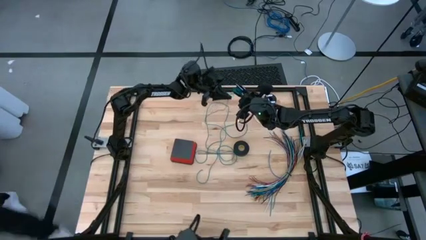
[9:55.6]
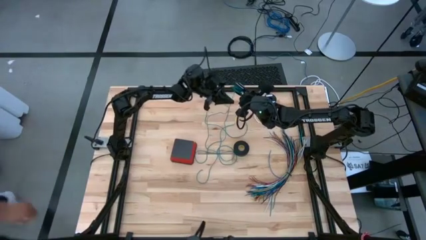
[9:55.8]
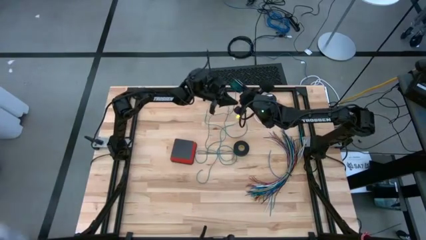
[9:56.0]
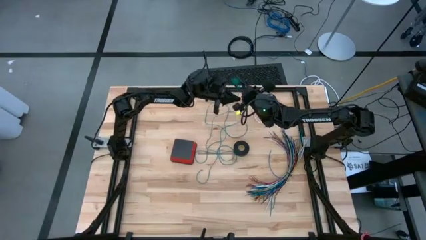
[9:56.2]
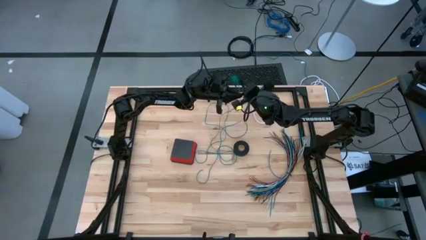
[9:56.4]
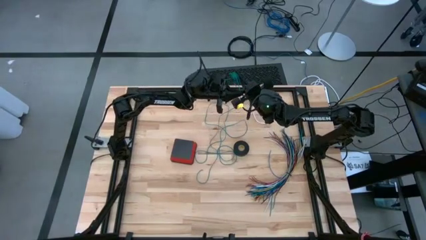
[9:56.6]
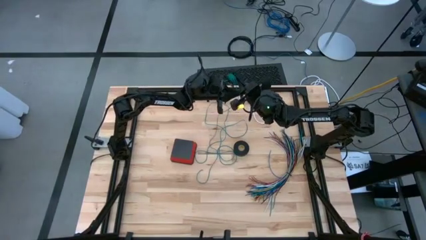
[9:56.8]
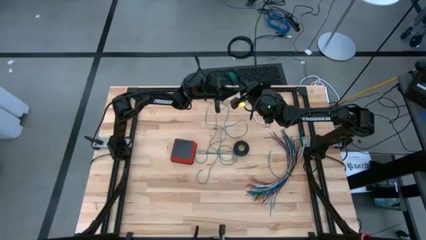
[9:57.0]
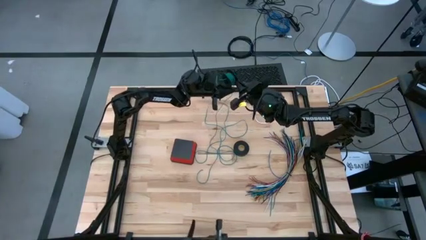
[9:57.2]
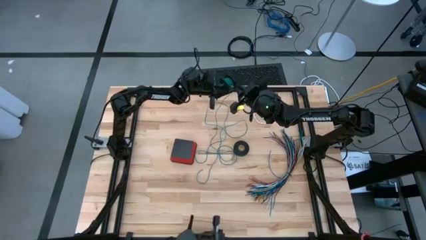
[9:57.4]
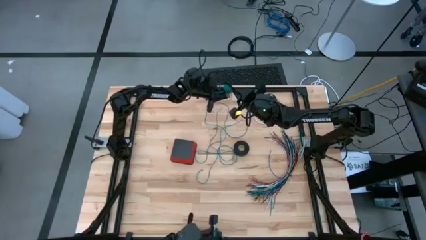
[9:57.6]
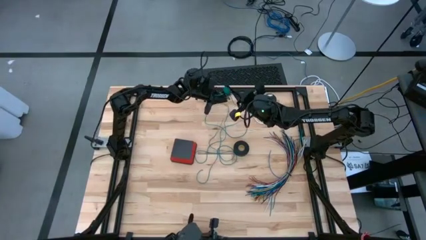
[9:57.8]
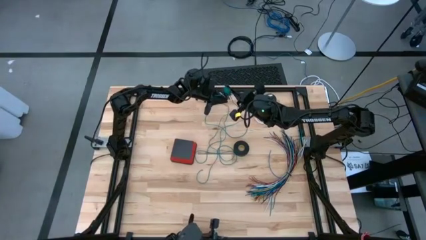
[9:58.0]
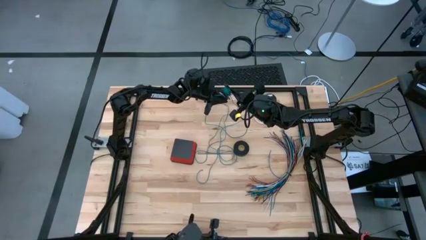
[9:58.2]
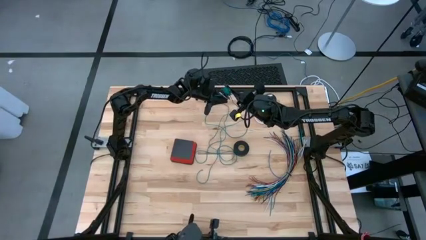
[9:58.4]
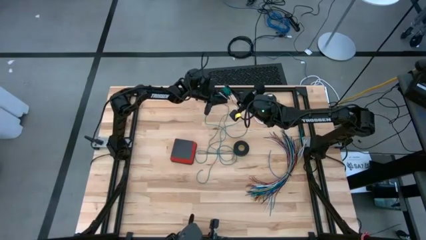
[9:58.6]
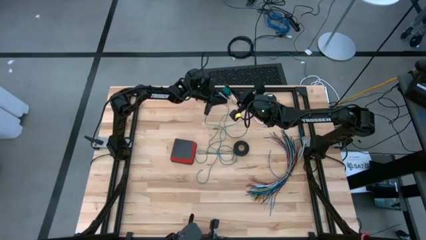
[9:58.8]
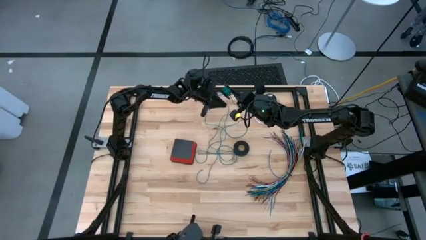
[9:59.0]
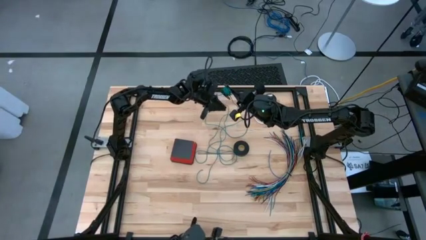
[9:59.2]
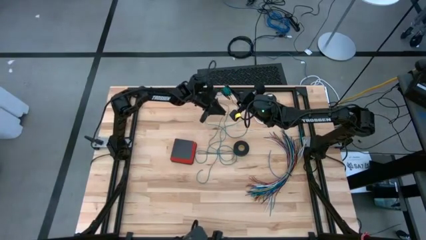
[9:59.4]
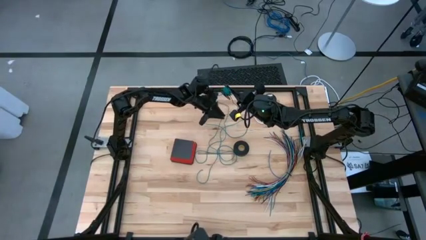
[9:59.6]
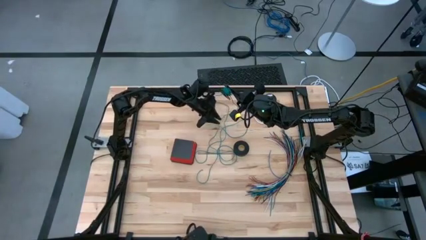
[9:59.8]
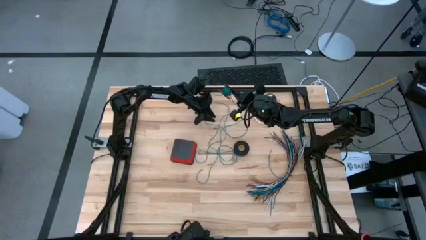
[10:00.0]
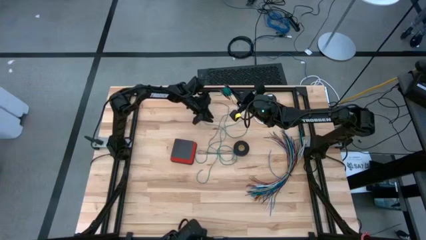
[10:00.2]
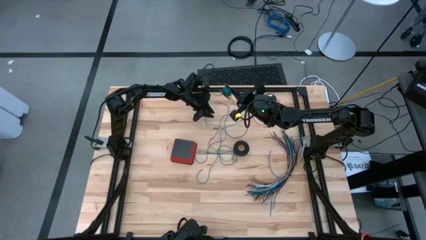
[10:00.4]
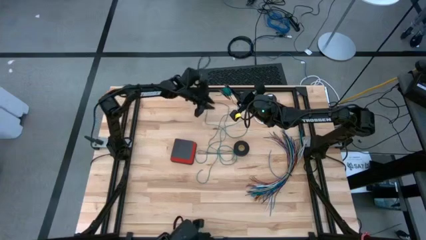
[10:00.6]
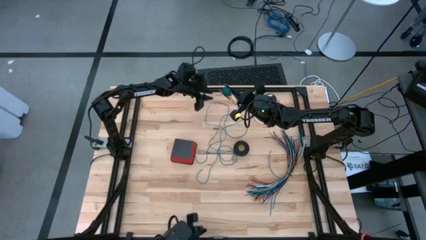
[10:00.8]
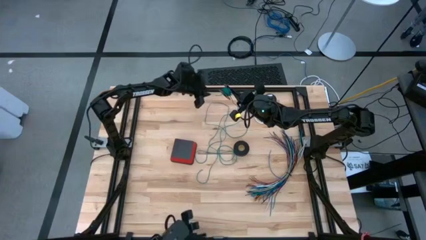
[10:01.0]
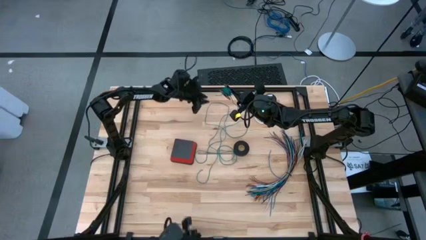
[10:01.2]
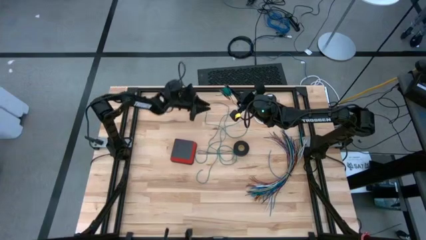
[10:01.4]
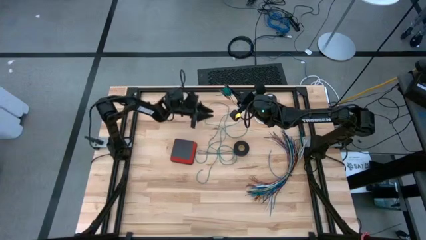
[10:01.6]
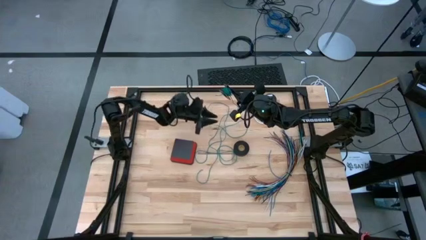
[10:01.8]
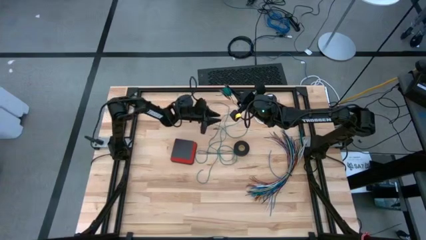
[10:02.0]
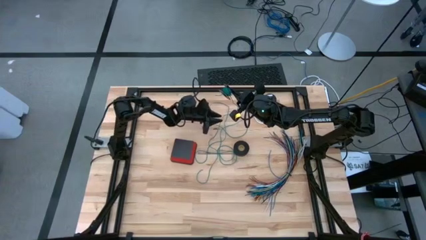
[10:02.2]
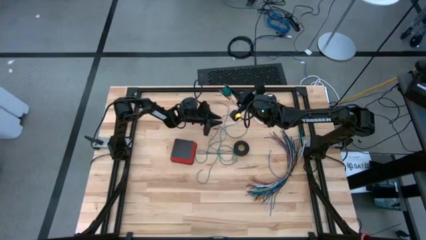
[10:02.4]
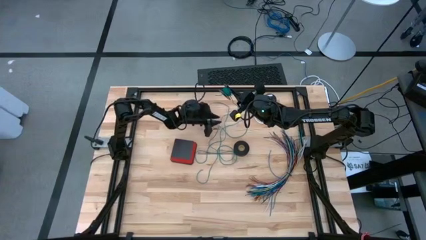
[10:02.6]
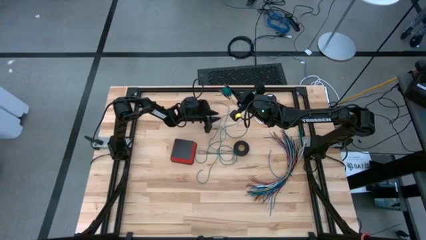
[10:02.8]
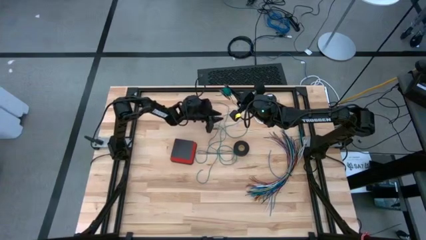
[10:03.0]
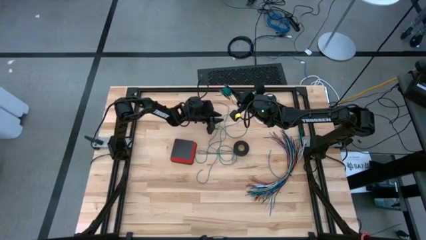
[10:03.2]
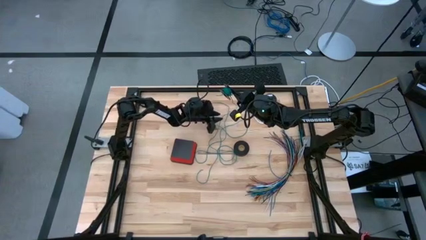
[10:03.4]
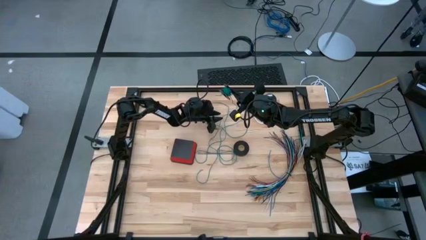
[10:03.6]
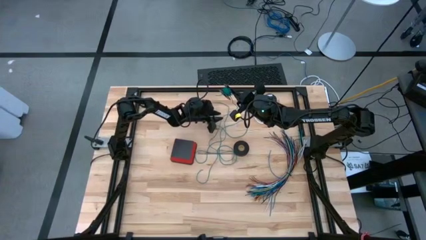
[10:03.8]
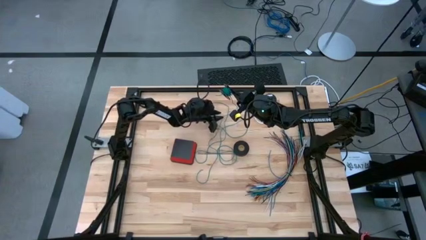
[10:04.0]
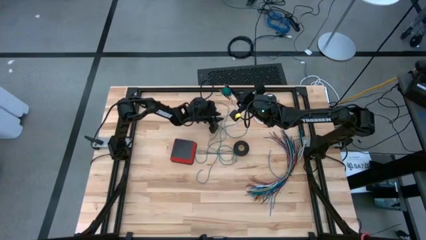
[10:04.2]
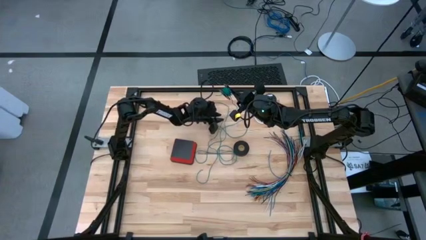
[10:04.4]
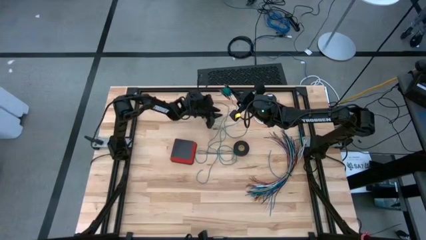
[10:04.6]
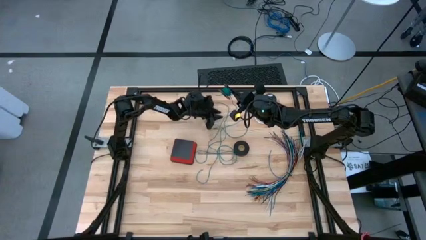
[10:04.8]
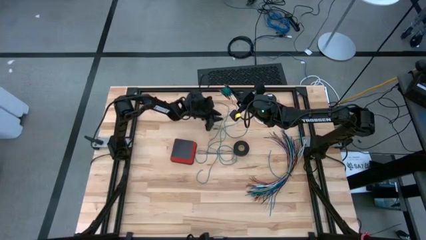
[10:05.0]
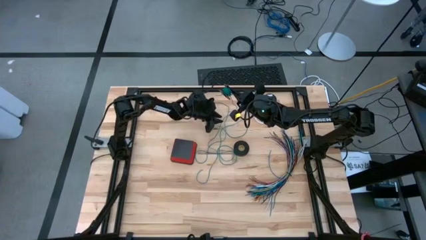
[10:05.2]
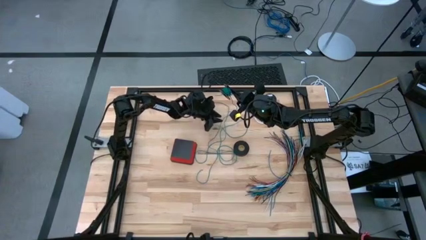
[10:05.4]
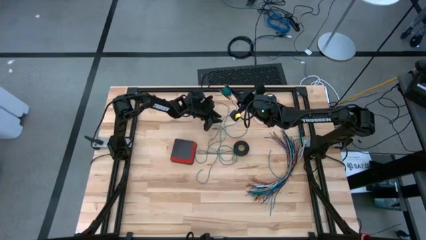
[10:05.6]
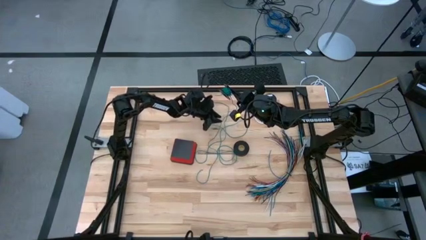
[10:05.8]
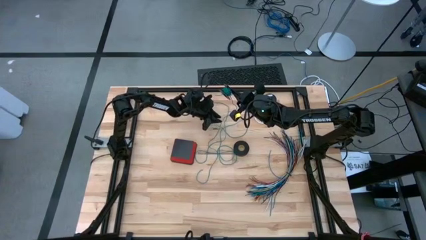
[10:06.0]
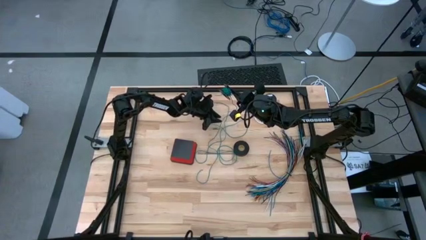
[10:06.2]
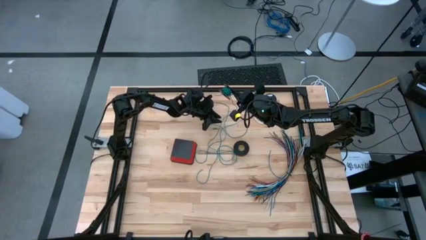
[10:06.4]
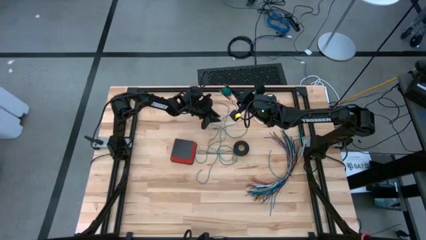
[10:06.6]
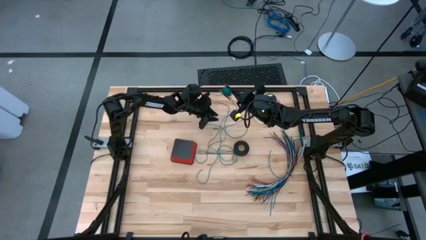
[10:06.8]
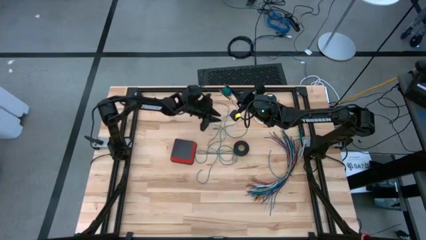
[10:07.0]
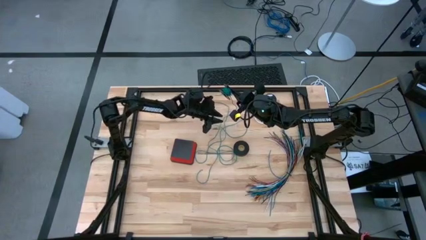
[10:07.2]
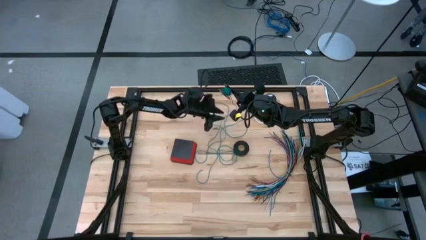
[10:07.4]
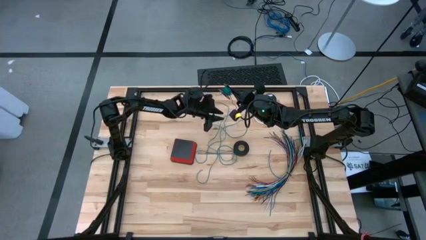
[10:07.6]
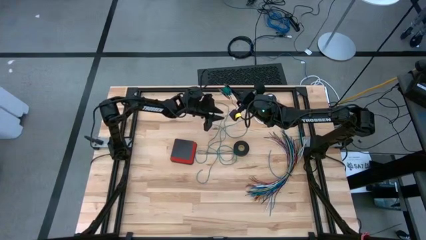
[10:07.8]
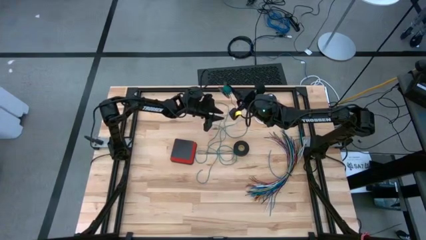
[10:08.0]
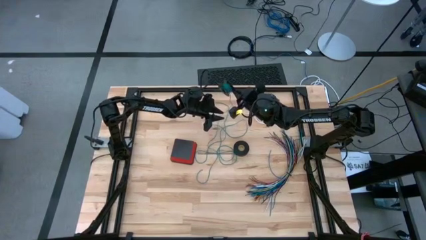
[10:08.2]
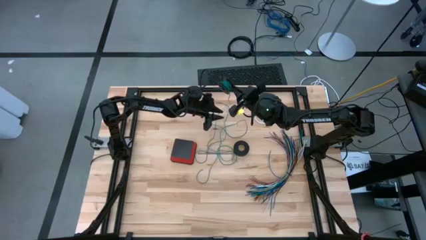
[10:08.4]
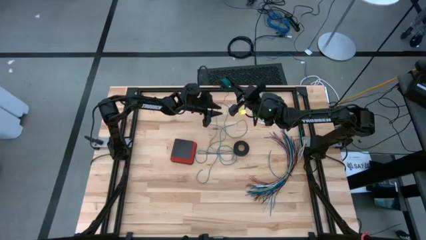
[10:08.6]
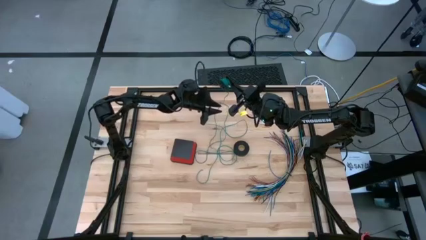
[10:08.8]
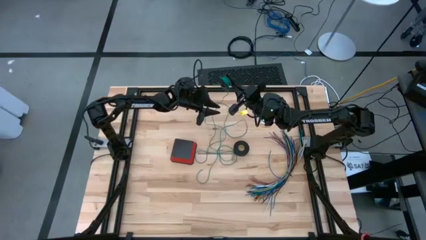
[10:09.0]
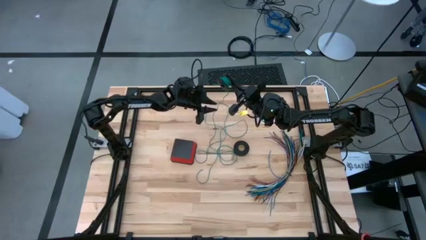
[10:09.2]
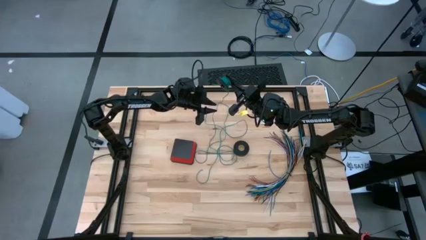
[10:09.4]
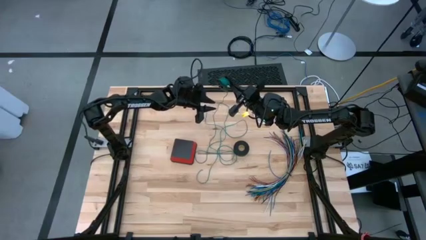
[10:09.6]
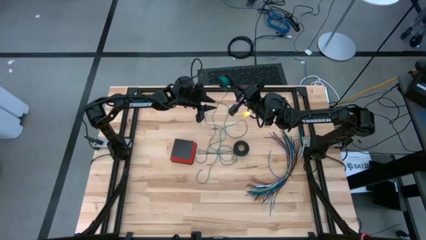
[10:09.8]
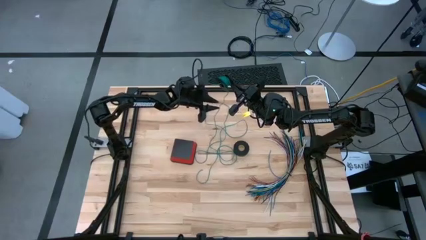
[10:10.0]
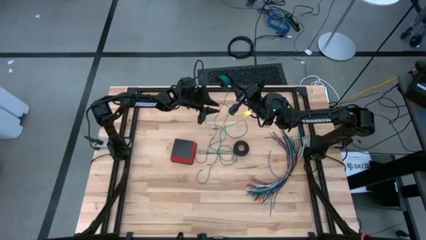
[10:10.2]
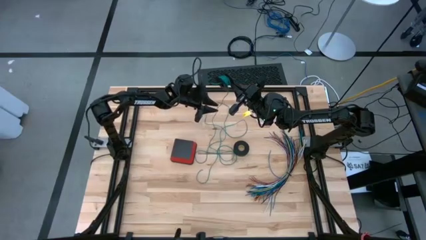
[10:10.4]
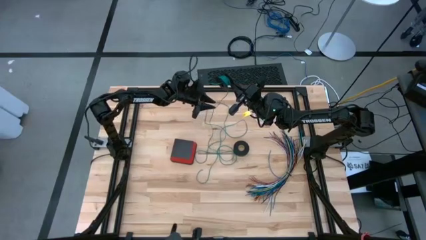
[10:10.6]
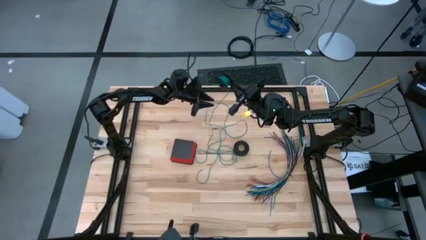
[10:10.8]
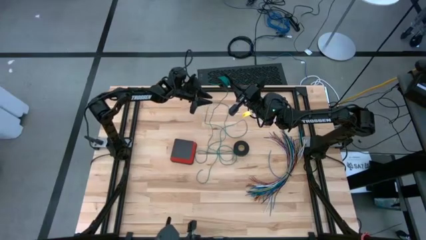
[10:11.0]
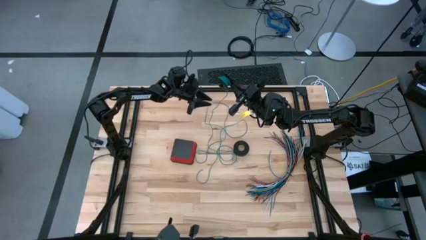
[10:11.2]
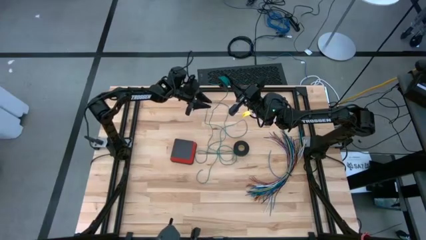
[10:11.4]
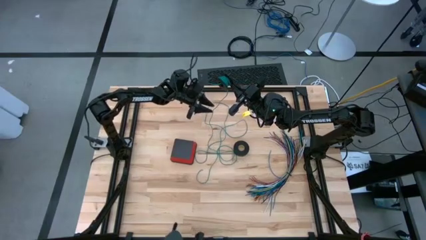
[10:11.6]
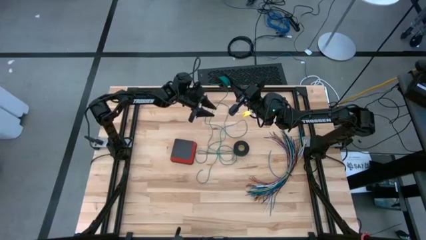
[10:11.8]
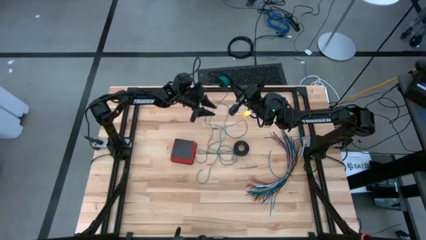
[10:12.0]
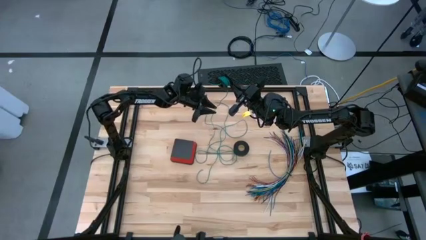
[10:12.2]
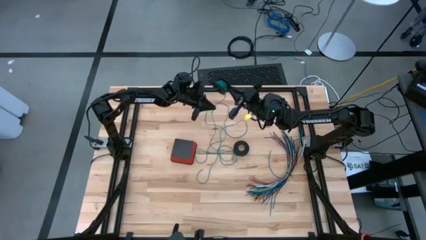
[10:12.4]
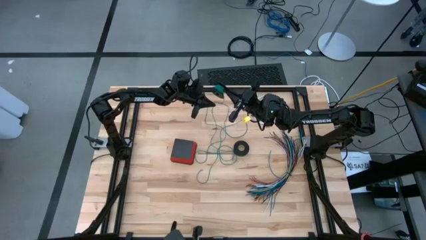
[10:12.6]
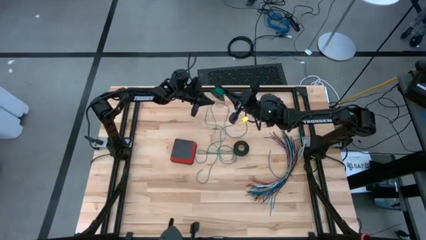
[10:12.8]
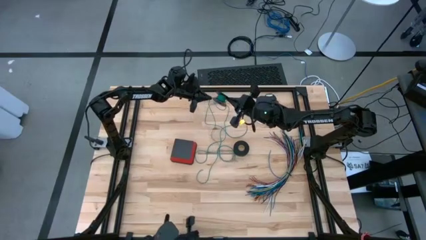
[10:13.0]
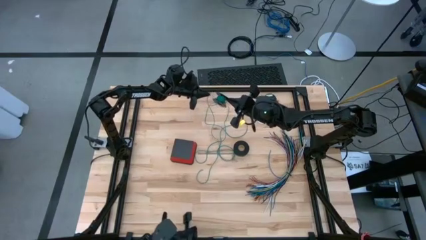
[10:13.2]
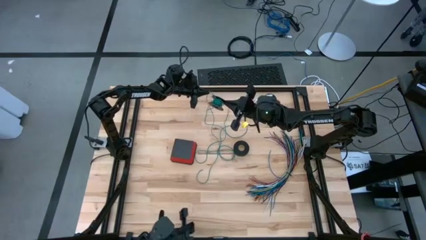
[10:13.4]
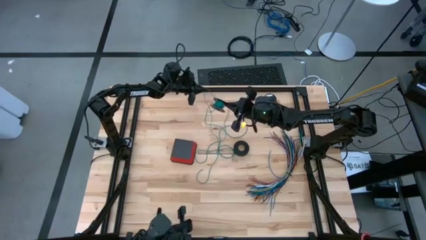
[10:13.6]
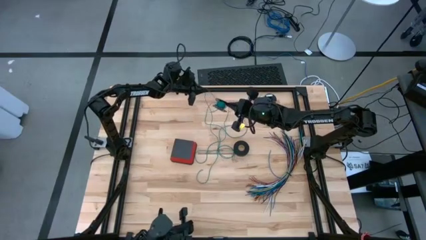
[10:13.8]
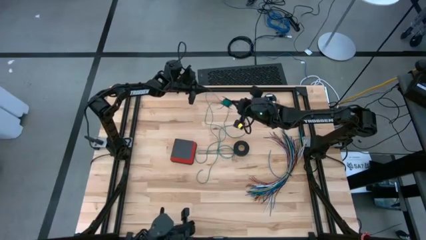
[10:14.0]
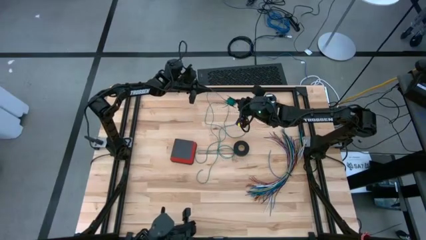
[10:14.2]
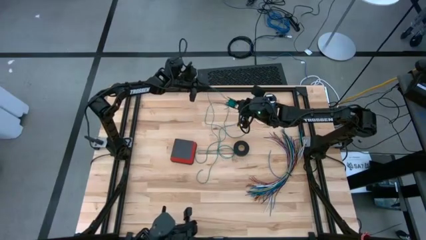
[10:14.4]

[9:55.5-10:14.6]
Task: Coiling cords
Coil the green wire cable on the spool
